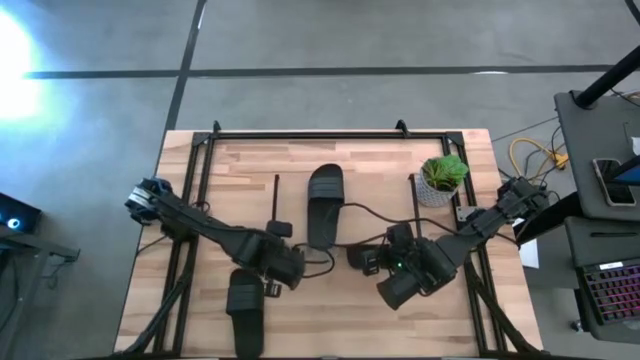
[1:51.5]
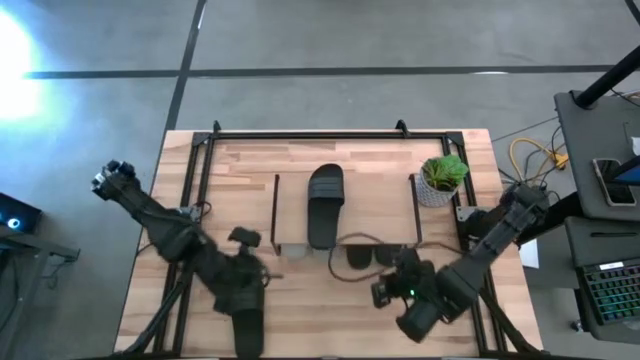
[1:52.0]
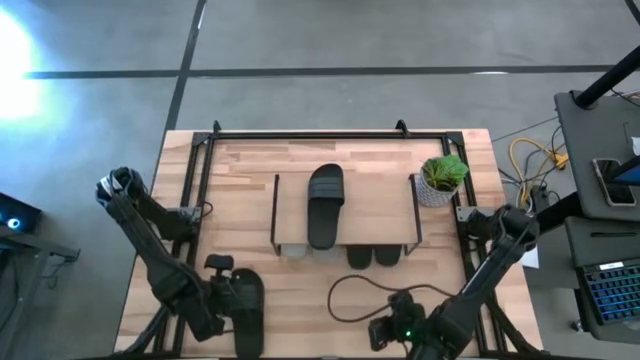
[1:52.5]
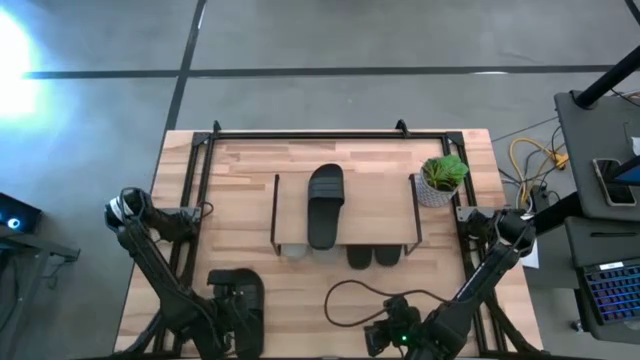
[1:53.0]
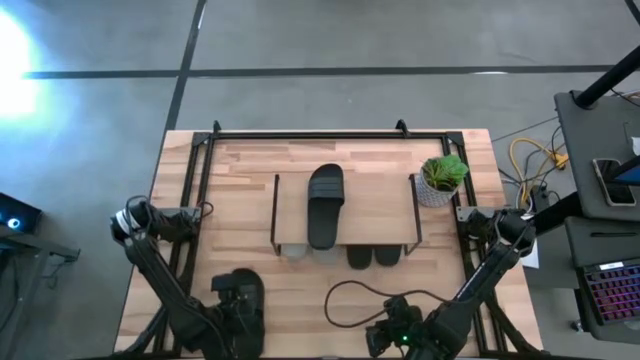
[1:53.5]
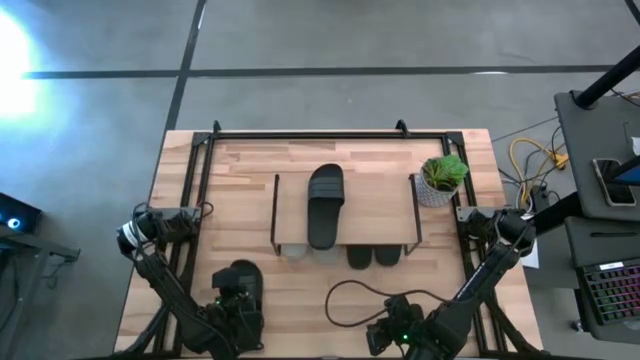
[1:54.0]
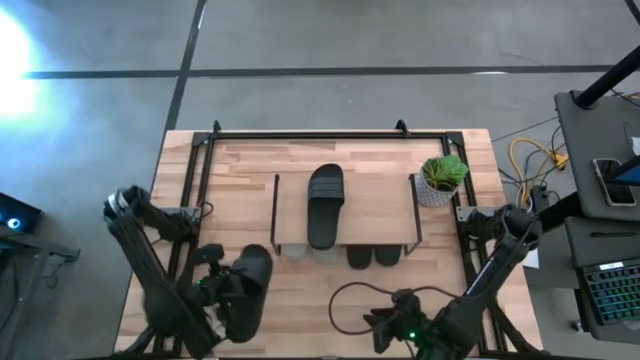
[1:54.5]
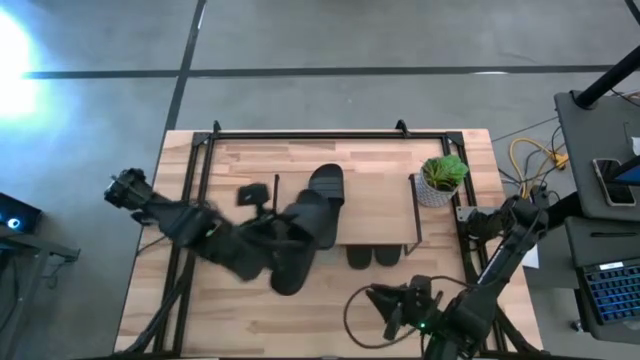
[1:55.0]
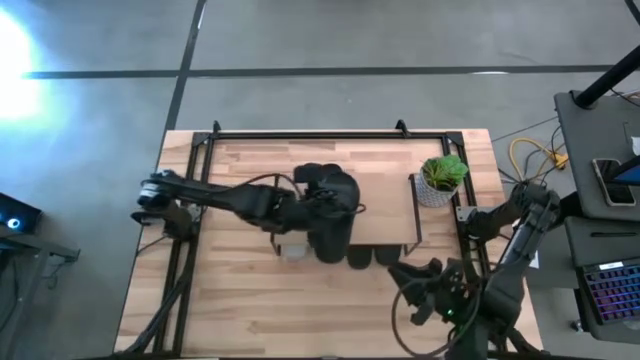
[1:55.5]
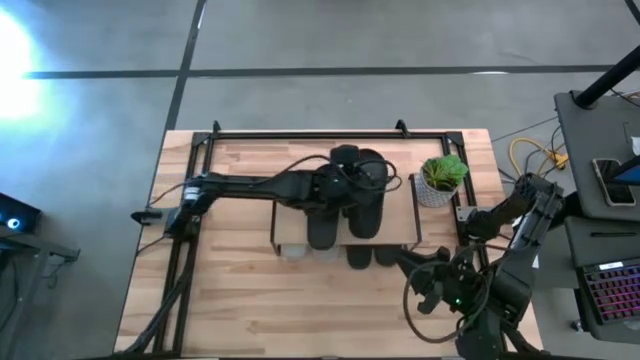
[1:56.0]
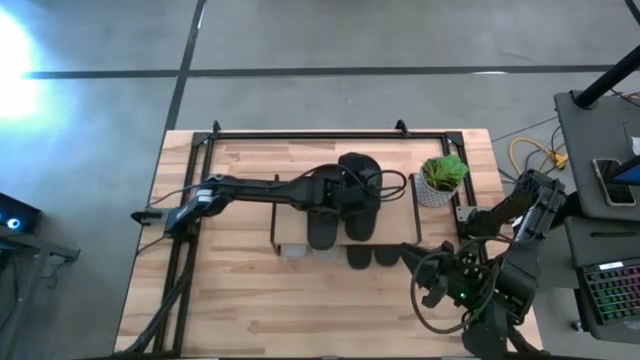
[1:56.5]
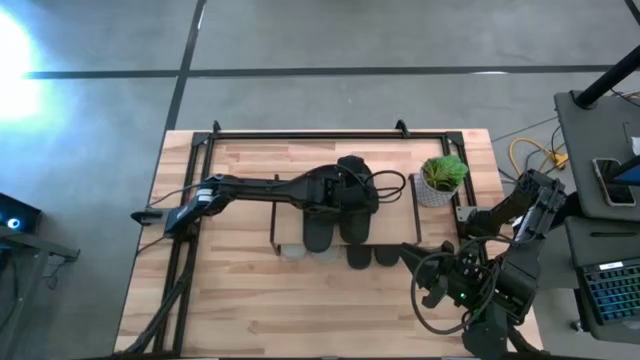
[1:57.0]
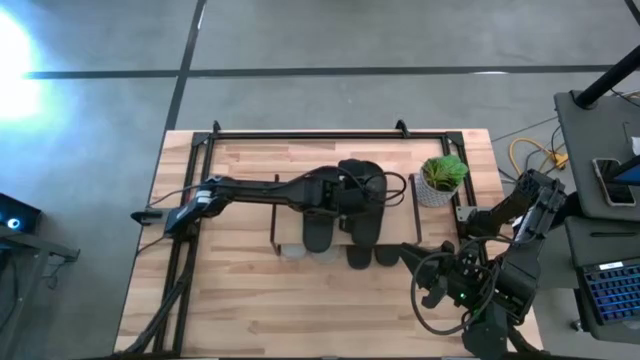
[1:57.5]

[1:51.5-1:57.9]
Task: Pick and place slides into the shelf
Put the black slide on the shelf

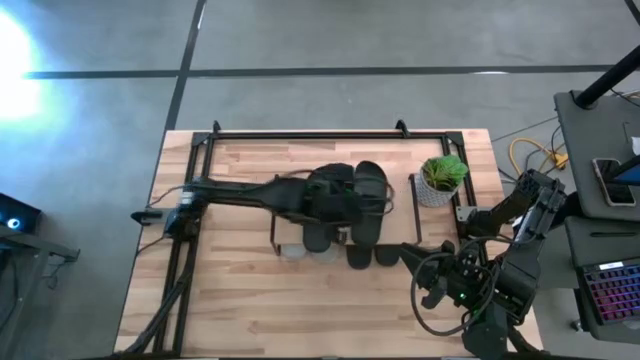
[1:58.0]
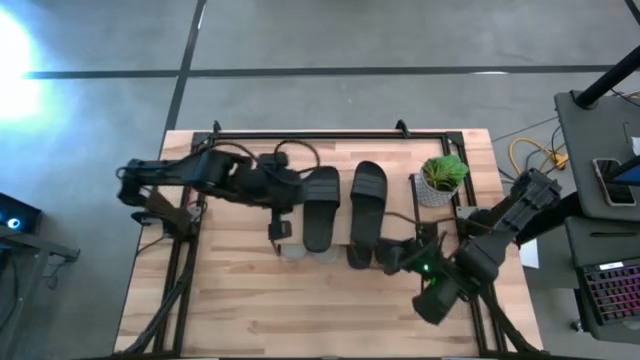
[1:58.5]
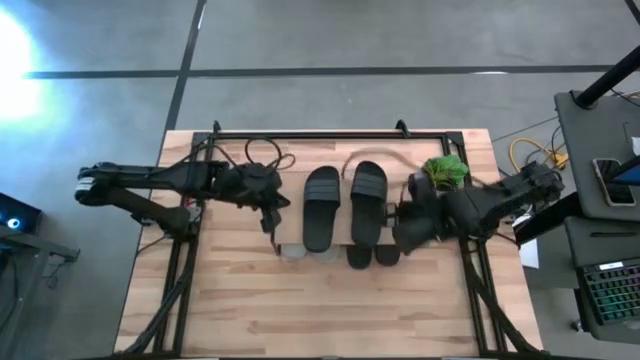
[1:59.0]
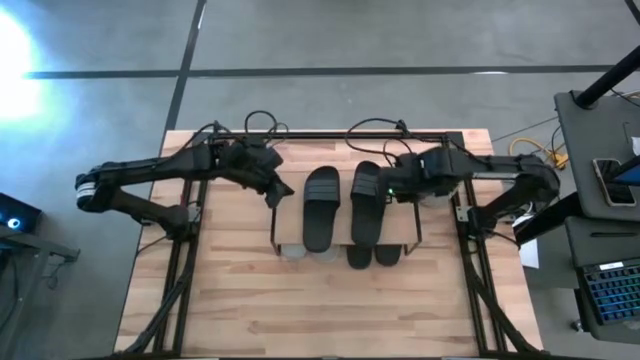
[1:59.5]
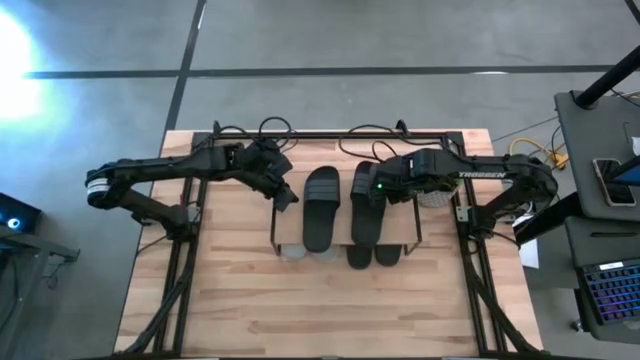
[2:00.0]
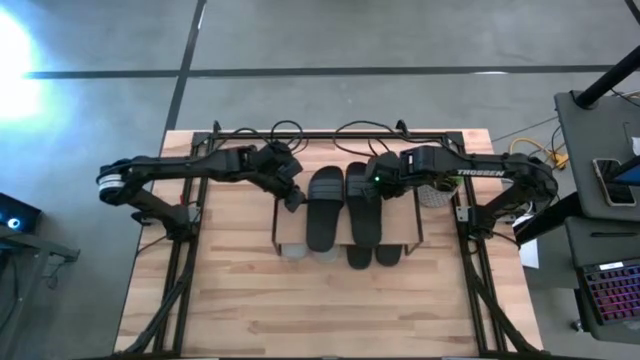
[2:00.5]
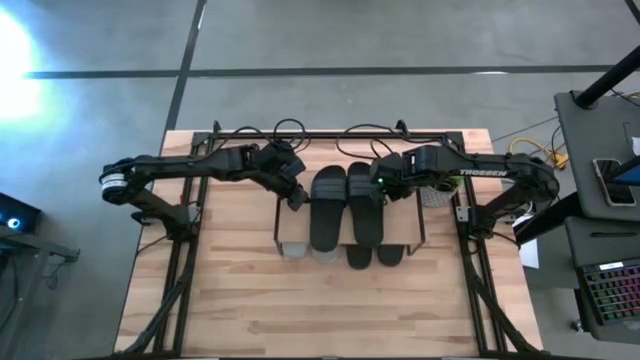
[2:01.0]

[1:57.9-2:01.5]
Adjust the black slides on the shelf

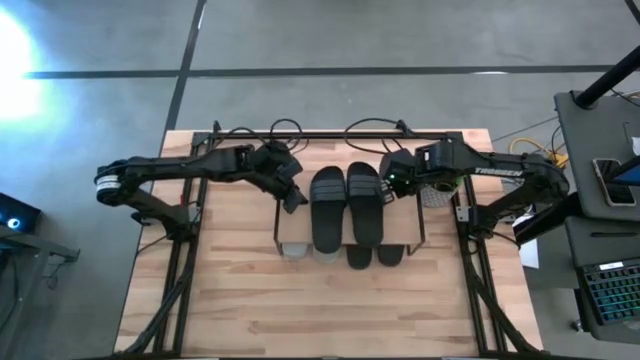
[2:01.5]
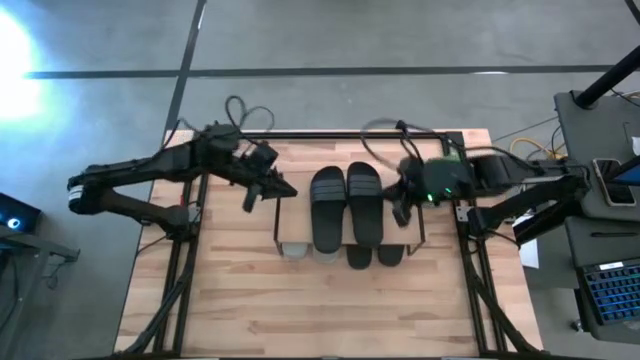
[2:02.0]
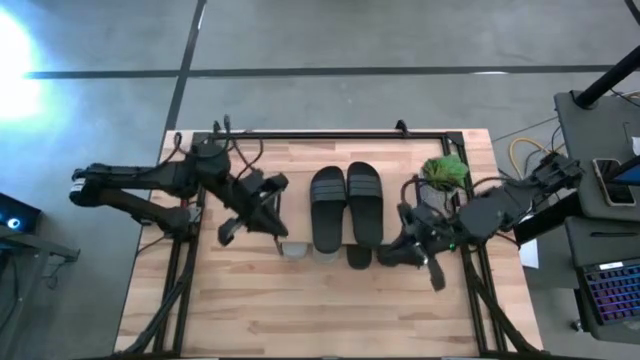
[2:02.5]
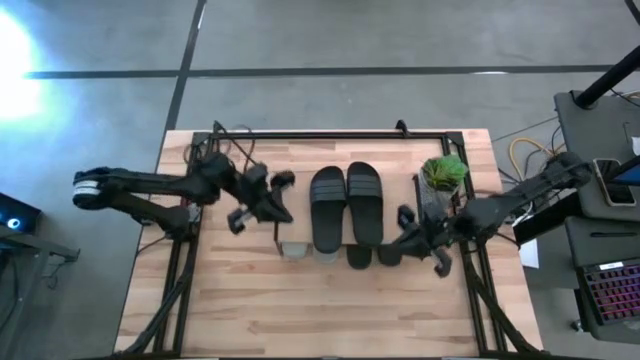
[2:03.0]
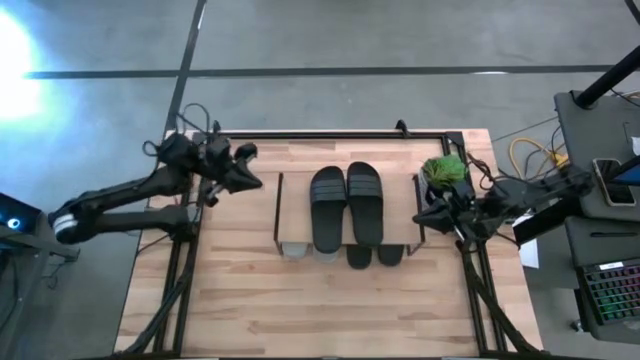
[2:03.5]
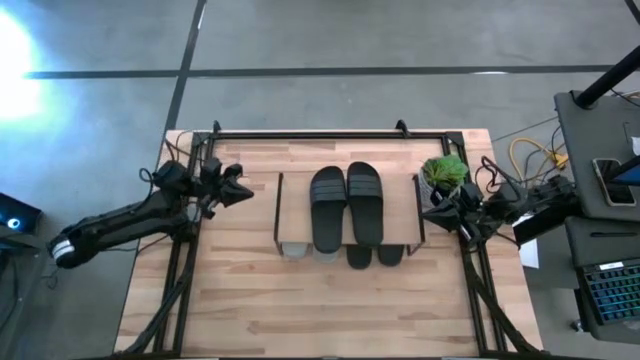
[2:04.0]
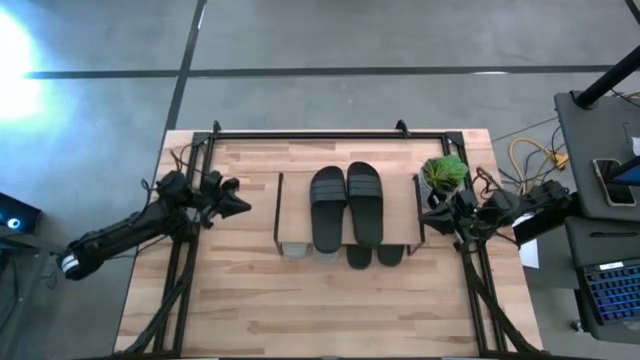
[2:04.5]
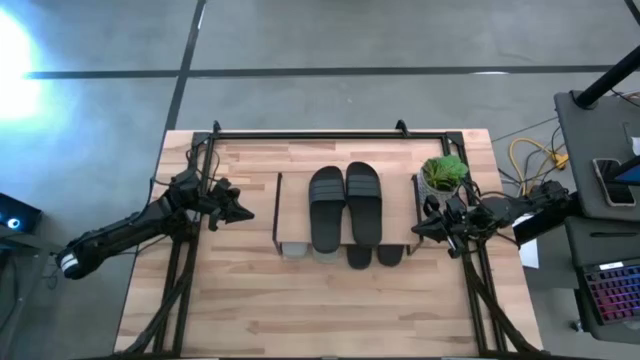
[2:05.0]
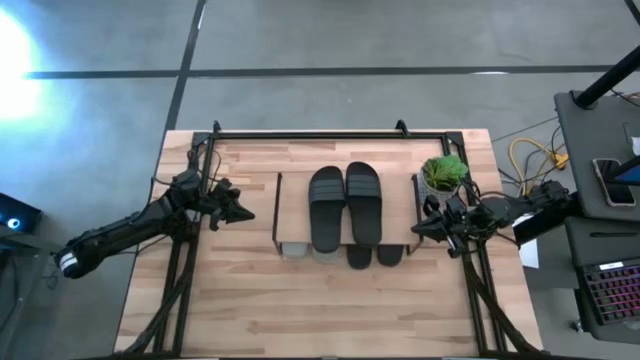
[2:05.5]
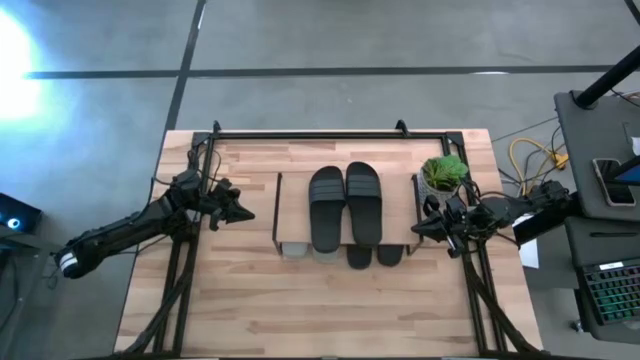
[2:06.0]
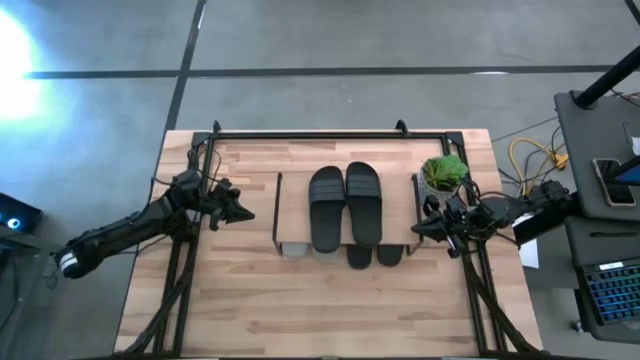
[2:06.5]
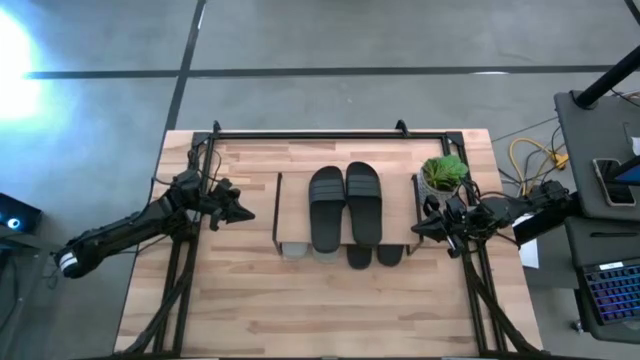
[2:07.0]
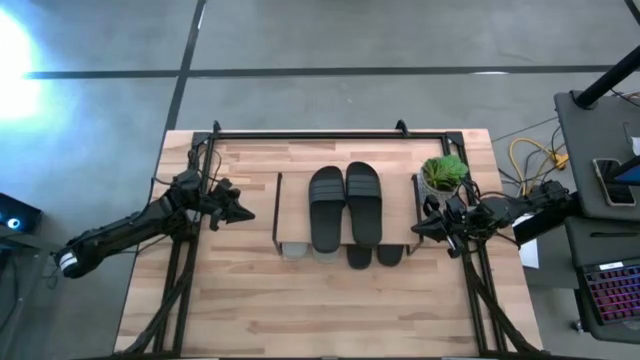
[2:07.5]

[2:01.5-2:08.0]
Return to Home Position

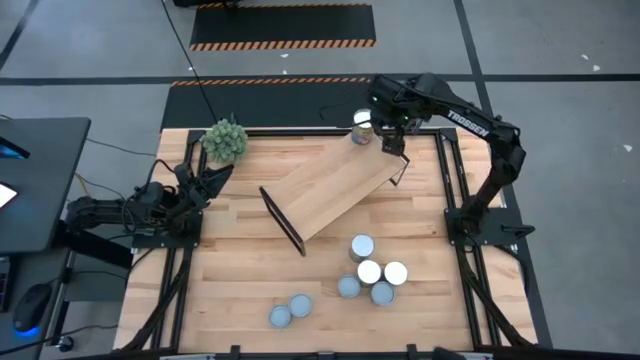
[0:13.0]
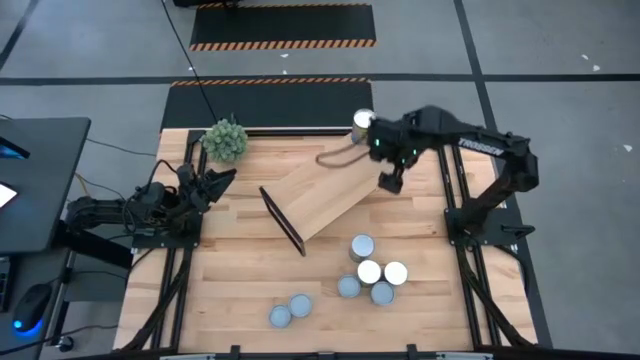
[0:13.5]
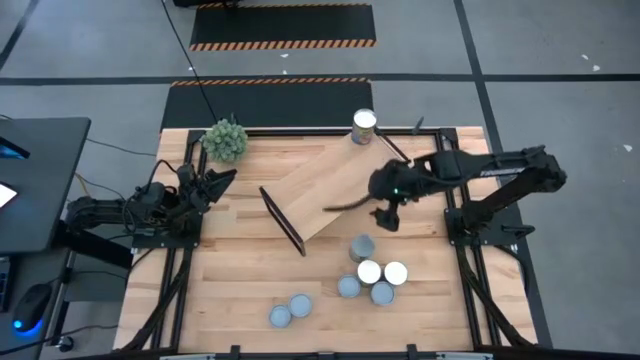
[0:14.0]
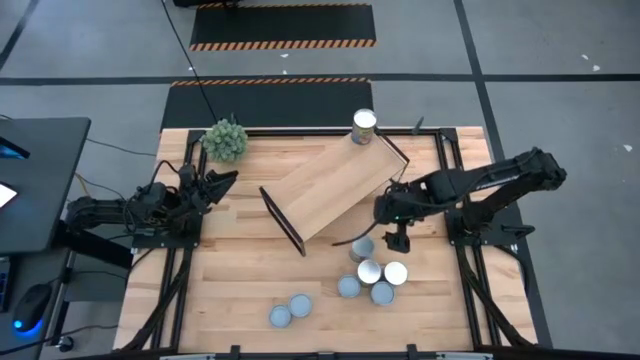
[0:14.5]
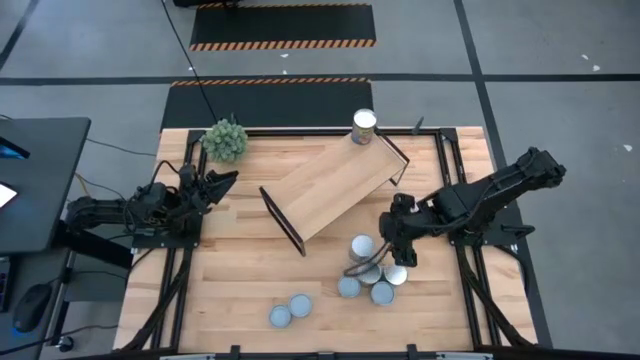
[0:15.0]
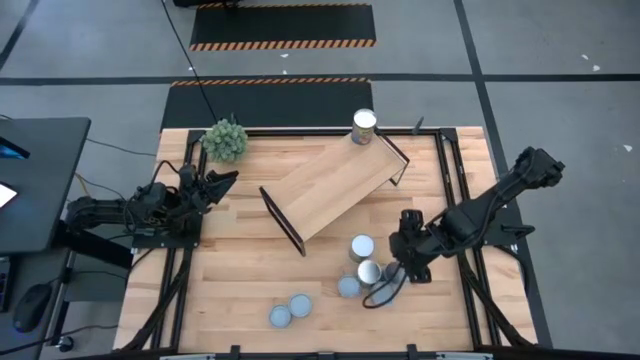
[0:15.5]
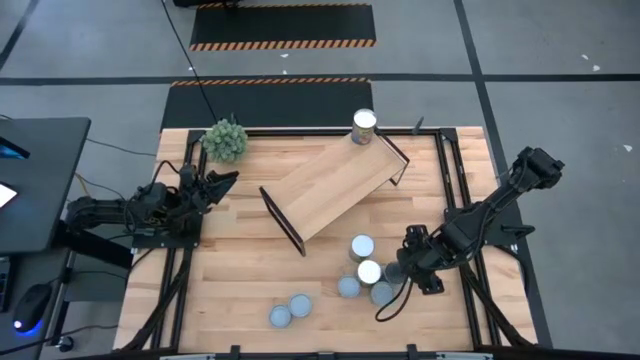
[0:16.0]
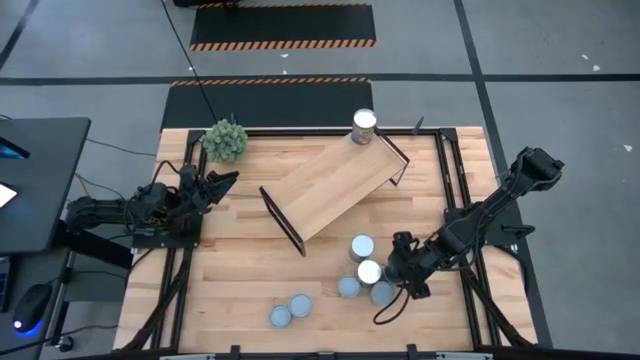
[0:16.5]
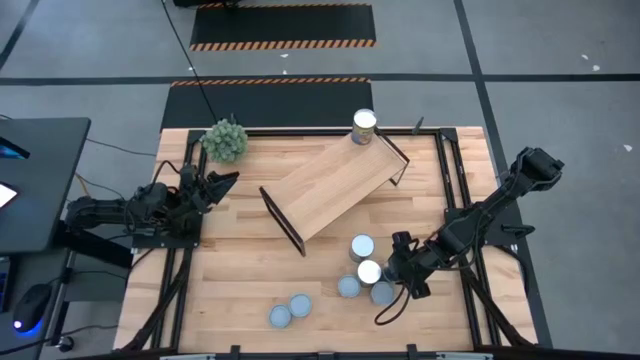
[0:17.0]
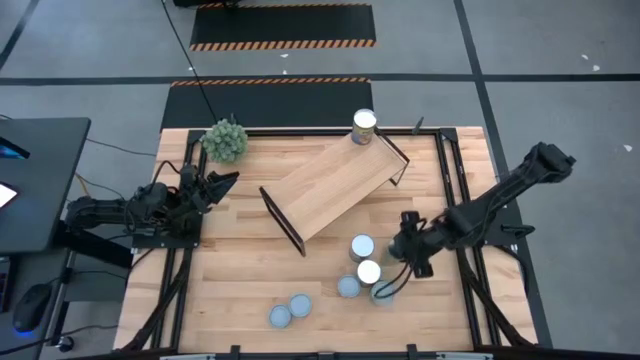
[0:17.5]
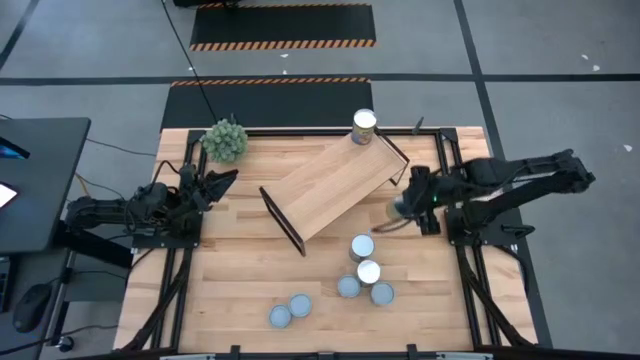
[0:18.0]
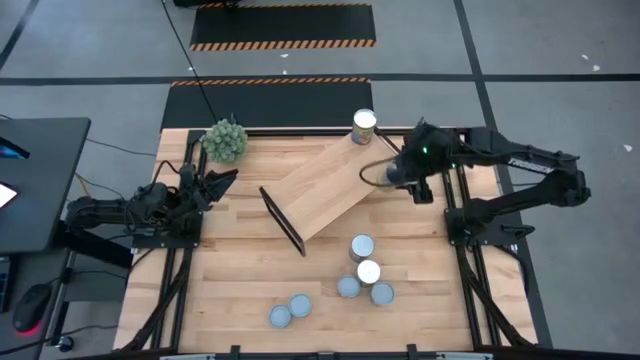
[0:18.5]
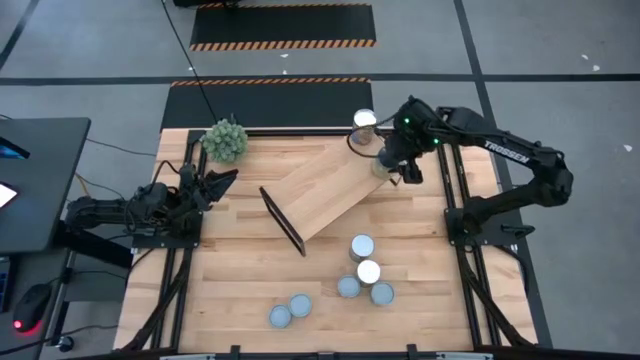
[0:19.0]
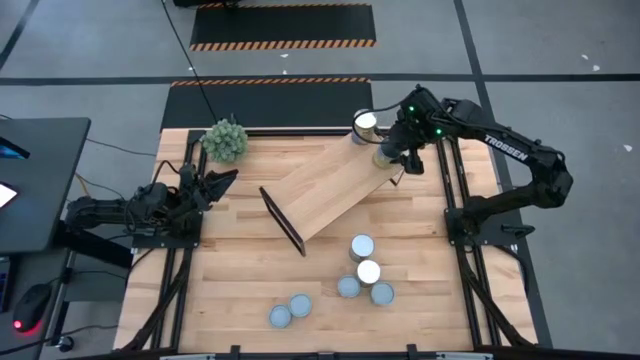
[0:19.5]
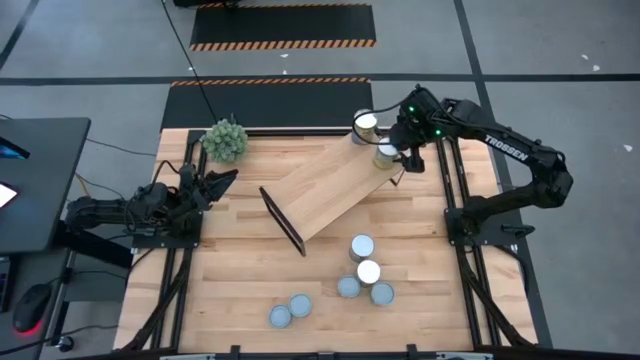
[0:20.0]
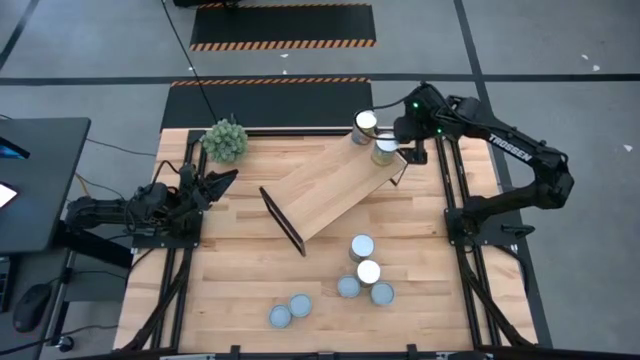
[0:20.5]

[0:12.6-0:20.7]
Task: Pick and place cans onto a shelf
Put the canned carrots on the shelf
